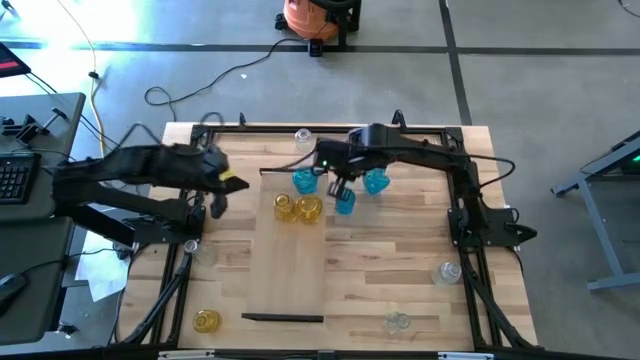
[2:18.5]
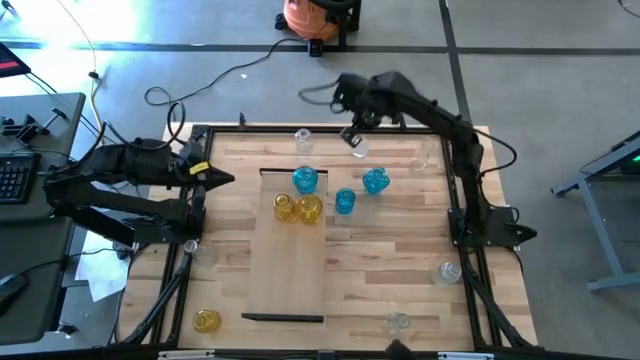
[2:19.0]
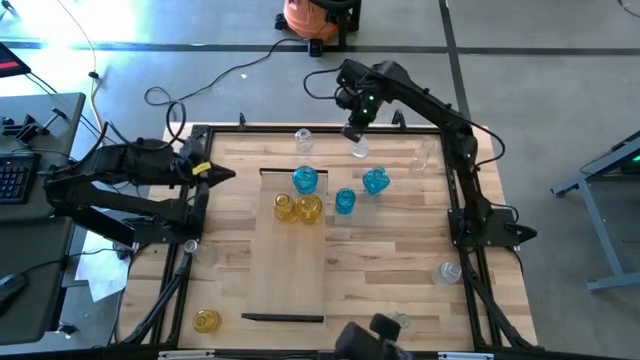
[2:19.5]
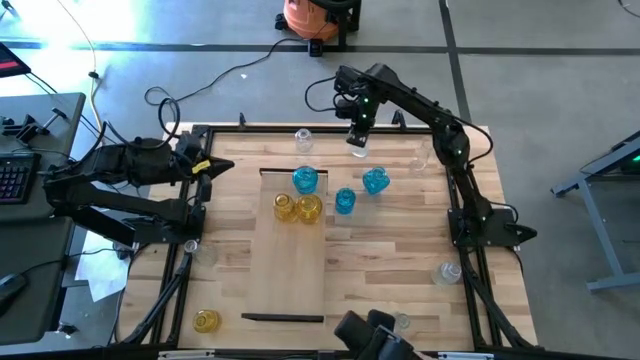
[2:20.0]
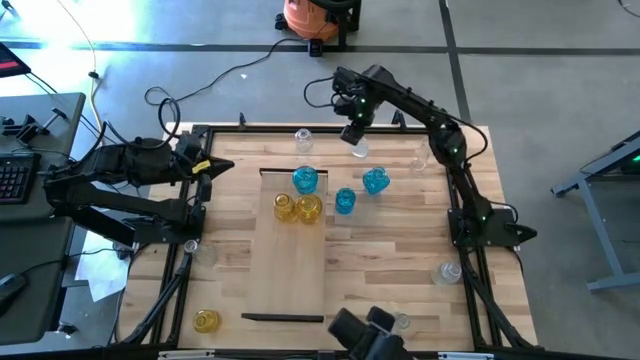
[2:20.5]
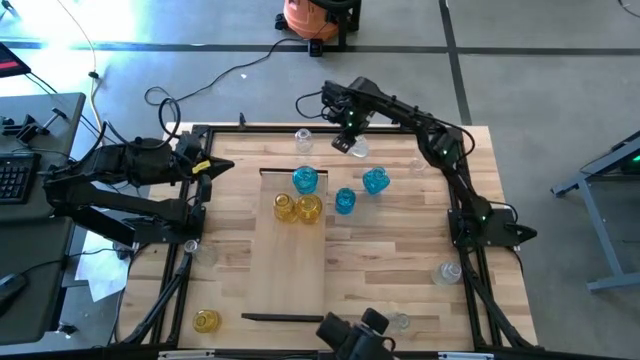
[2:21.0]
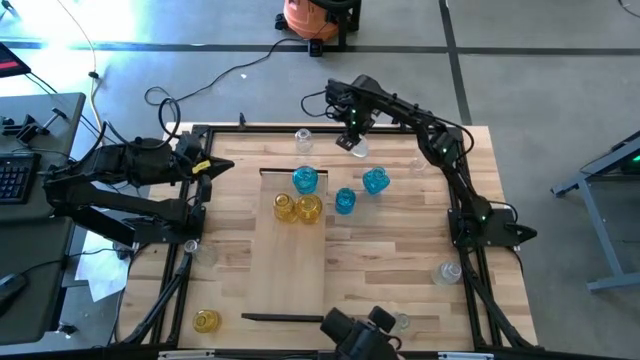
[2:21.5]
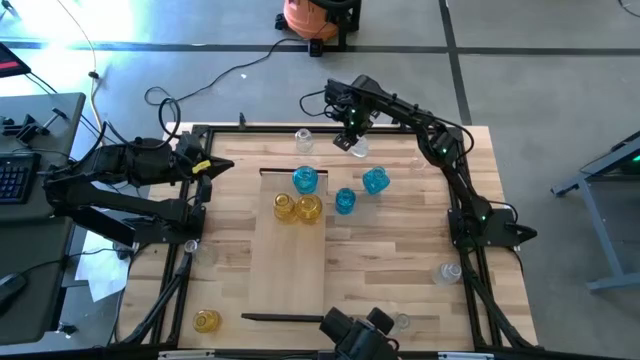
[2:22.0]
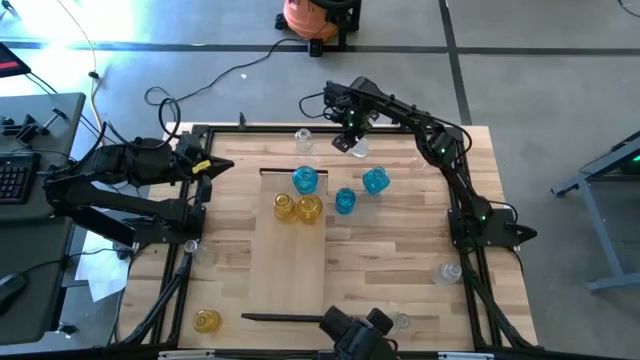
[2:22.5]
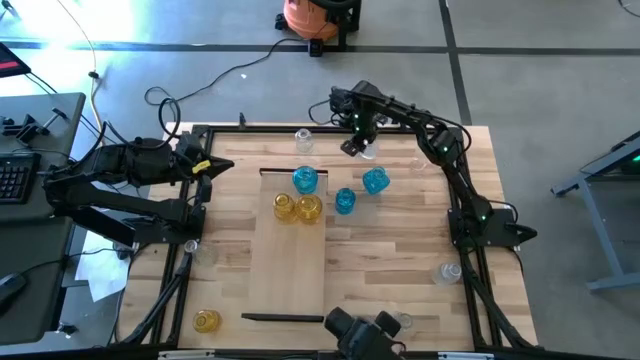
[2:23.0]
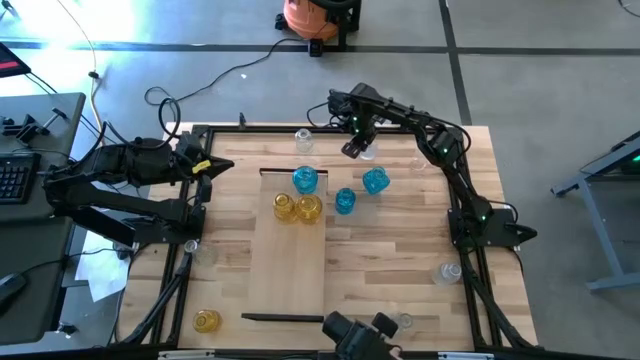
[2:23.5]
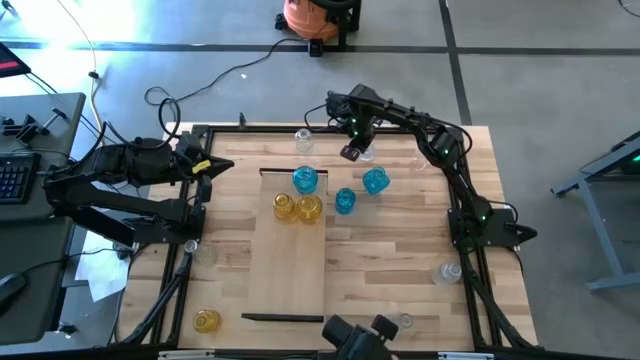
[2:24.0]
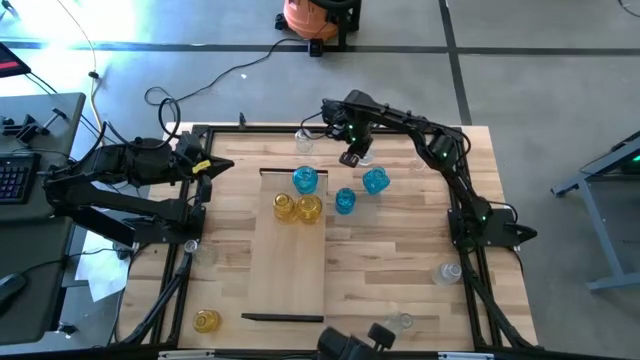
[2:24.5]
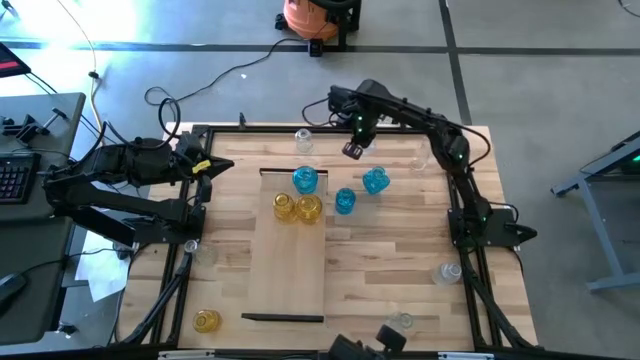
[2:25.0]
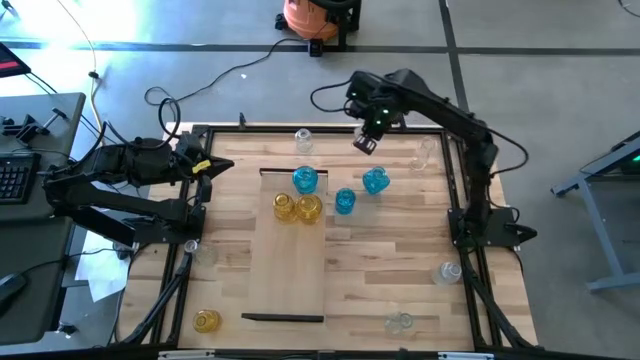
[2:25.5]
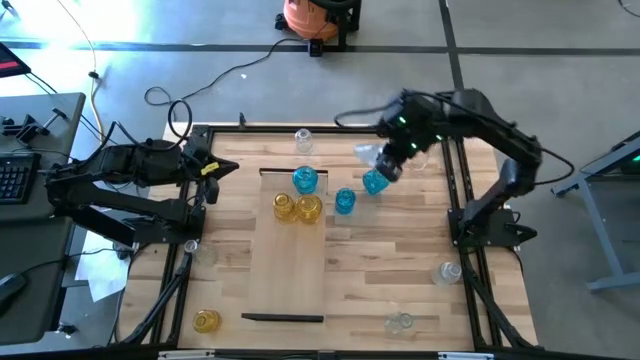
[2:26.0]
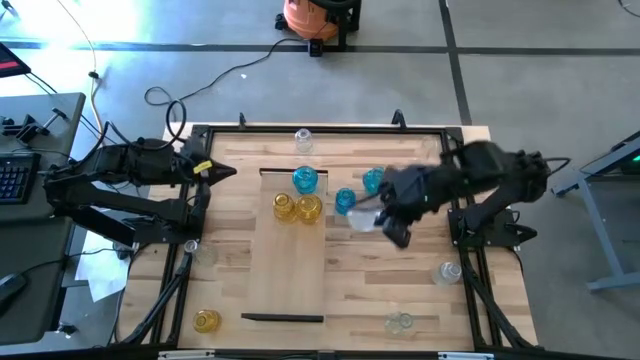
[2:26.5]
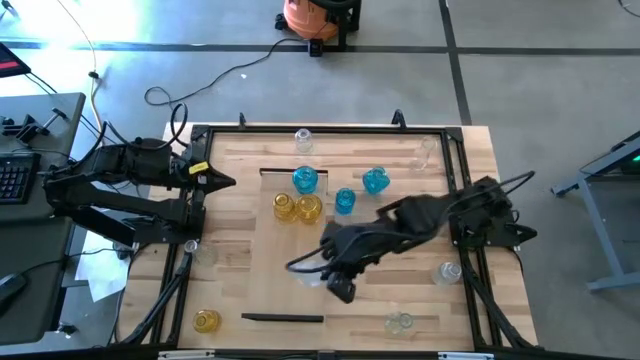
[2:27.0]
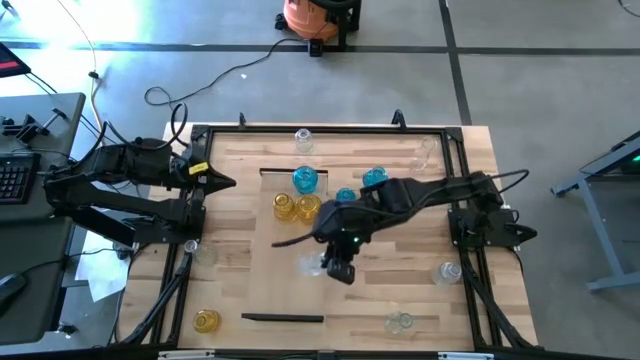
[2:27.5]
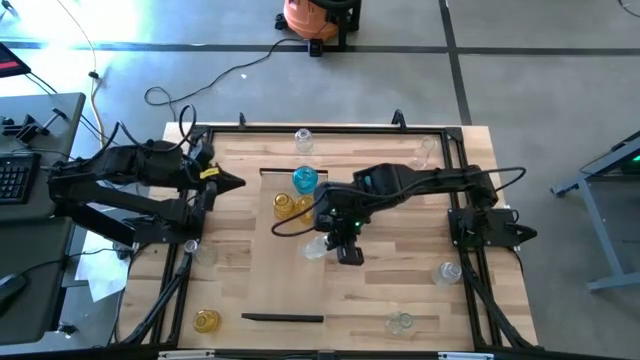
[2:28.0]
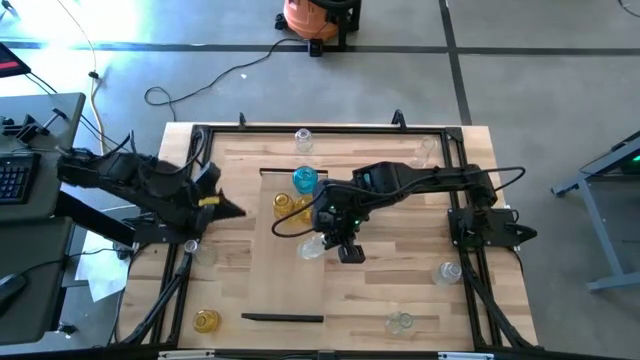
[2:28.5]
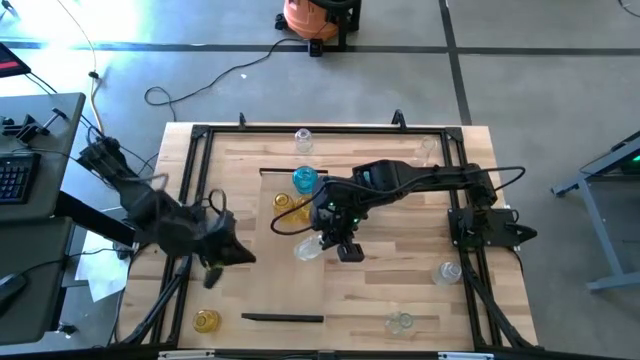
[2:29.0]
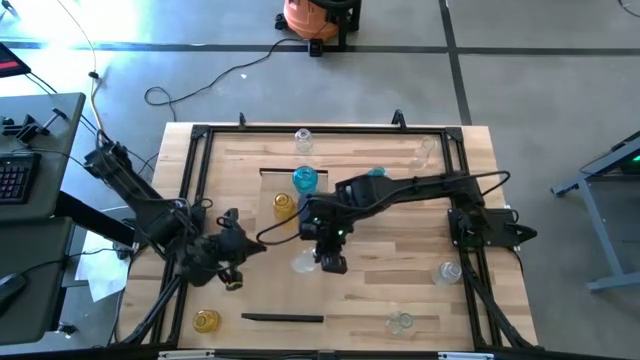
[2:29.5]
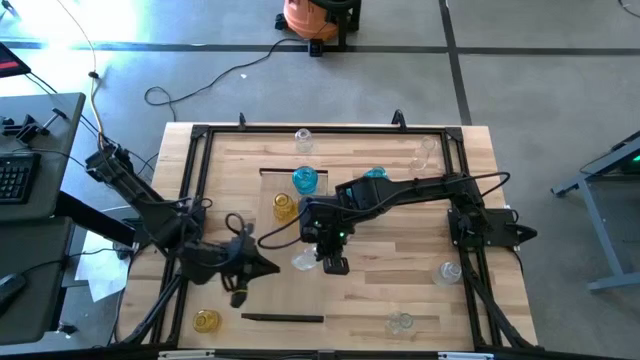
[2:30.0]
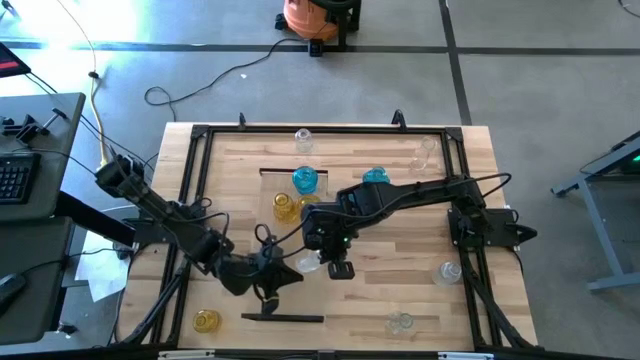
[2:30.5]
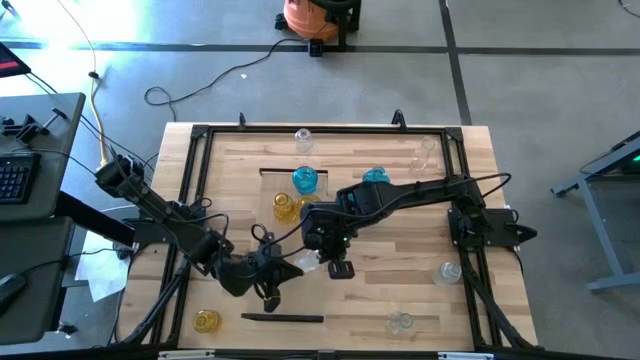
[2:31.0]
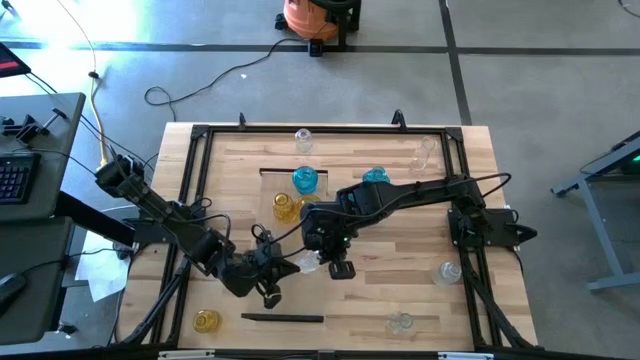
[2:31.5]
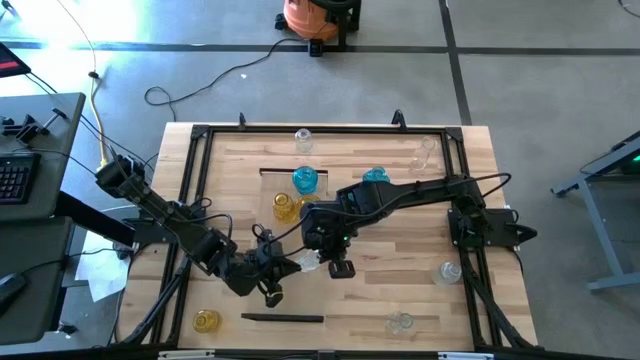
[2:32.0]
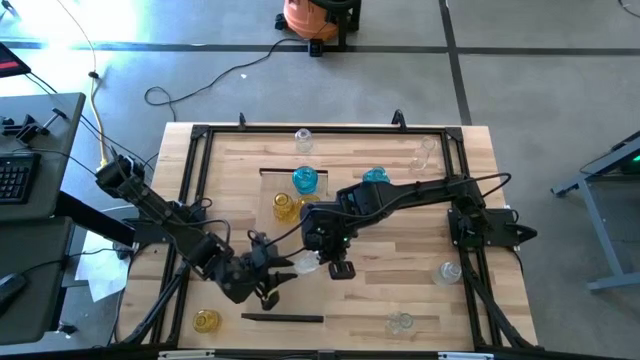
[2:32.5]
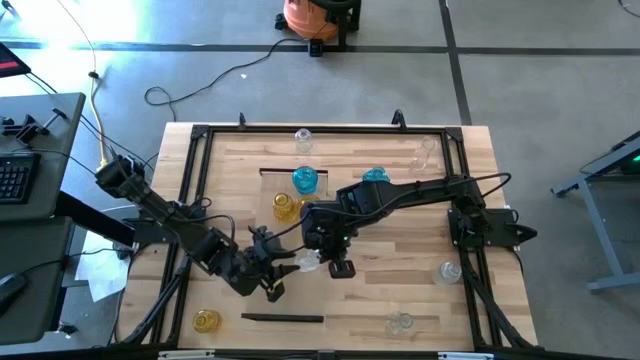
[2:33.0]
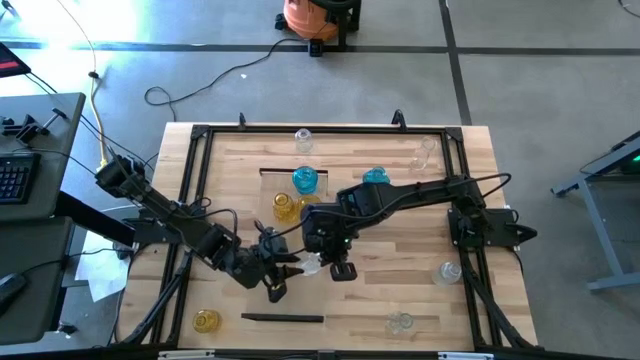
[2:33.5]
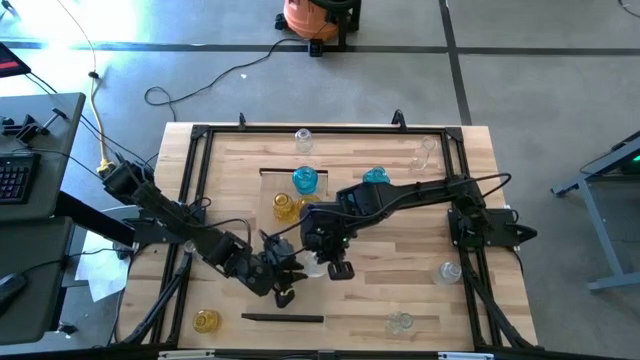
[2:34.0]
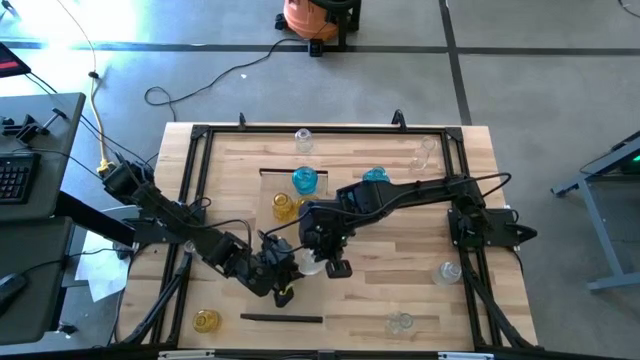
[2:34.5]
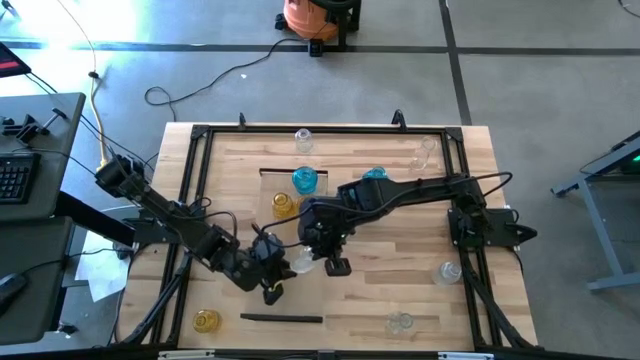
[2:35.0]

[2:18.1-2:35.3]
Task: sort vases onto shelf
Put the top middle transparent vase on the shelf

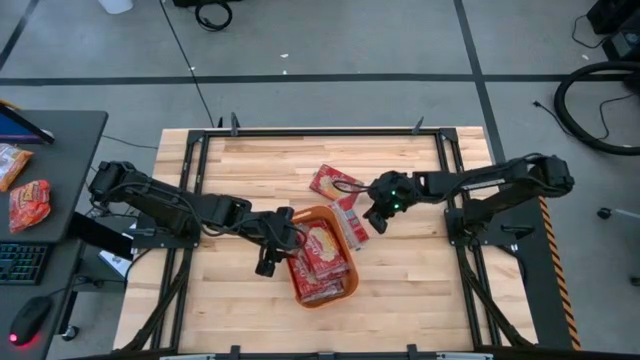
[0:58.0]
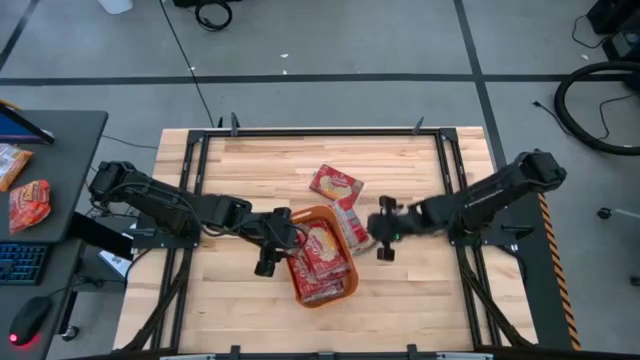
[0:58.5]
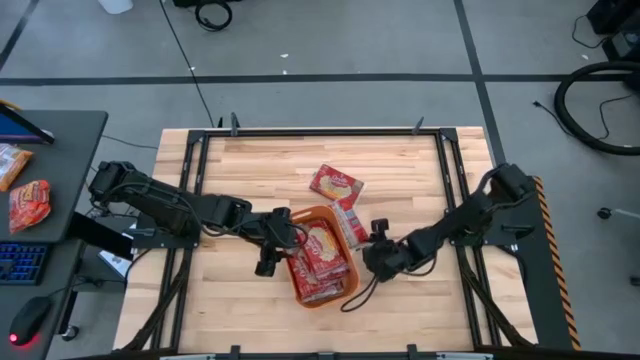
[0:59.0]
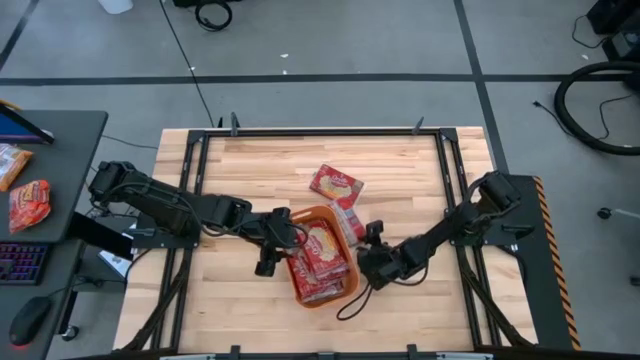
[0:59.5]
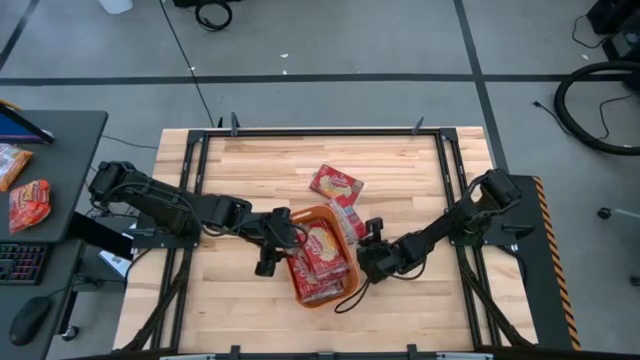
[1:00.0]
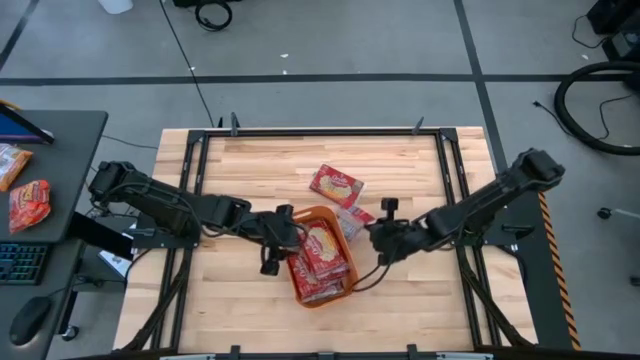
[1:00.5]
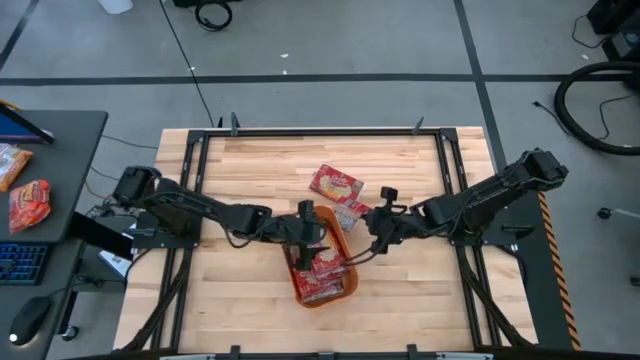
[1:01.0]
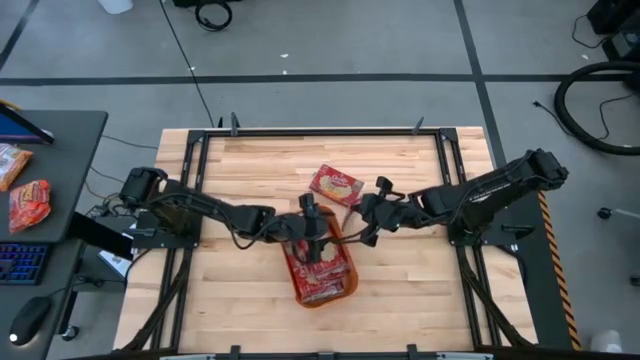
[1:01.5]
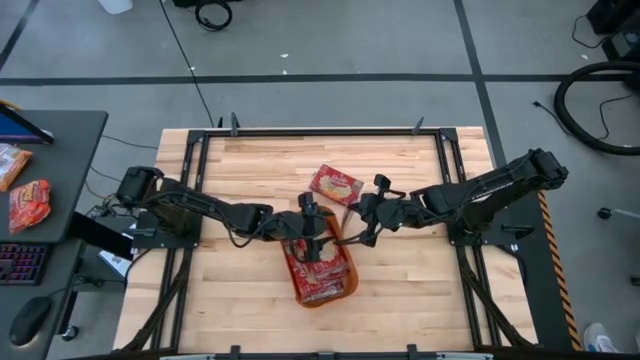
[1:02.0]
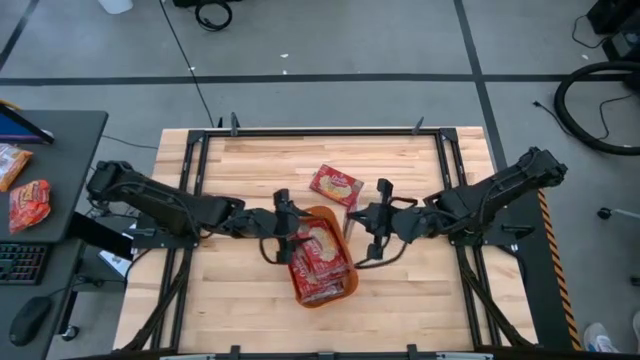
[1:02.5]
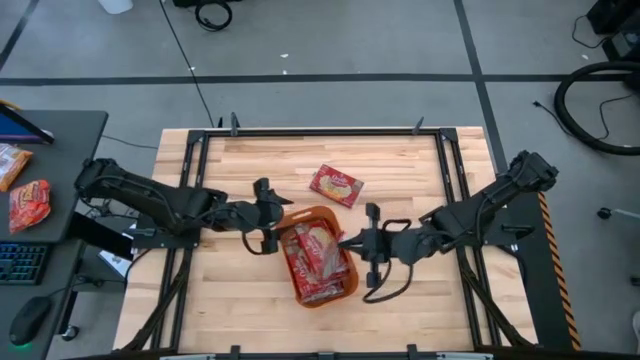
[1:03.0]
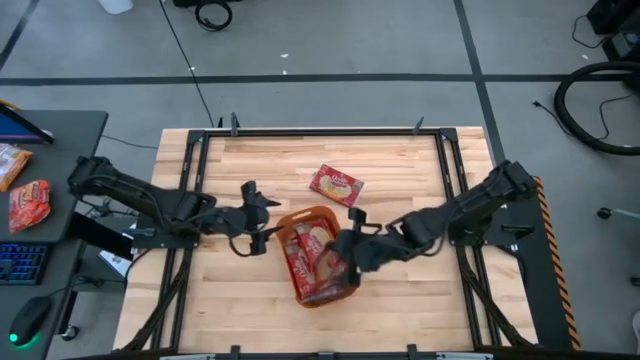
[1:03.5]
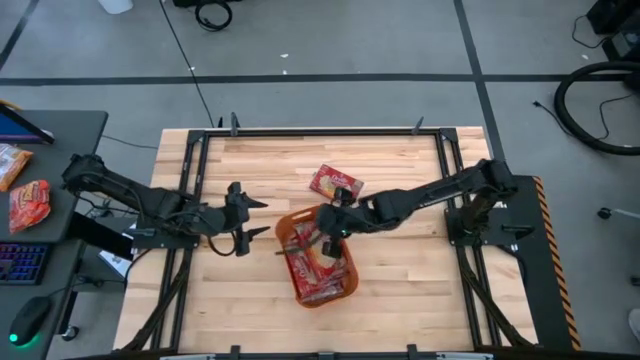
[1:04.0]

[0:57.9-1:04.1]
Task: Sort popcorn bags into baskets
Put the red popcorn bag into the orange bin
